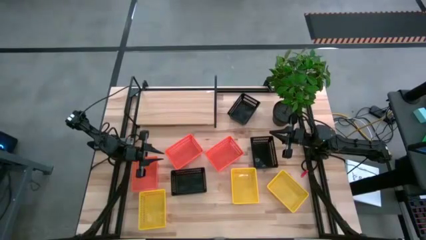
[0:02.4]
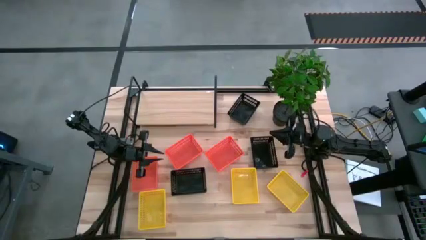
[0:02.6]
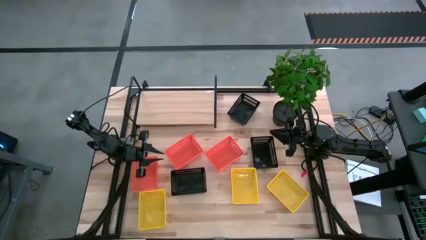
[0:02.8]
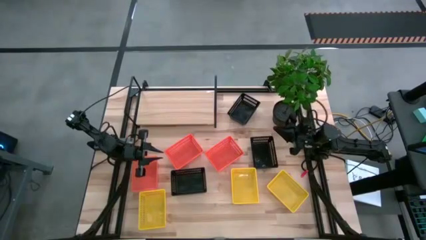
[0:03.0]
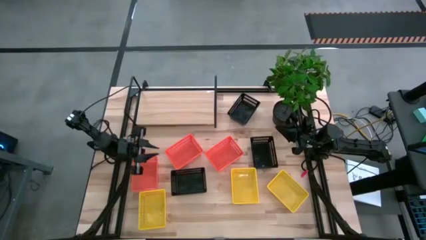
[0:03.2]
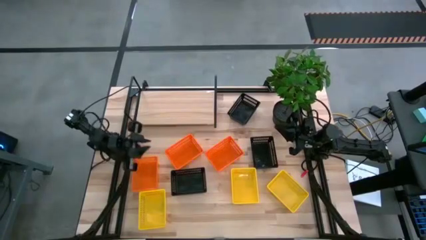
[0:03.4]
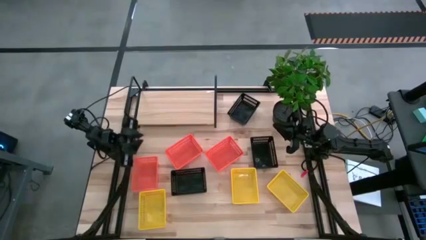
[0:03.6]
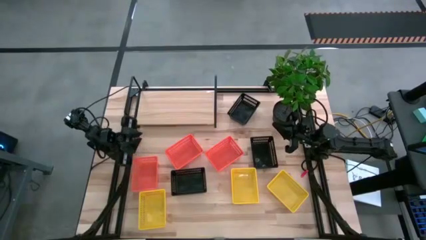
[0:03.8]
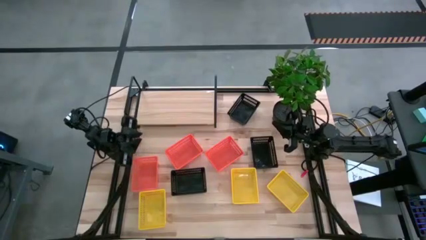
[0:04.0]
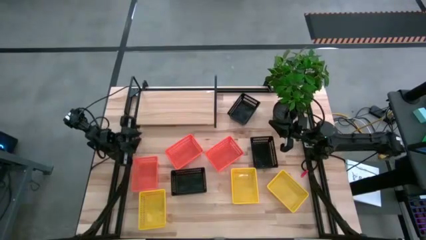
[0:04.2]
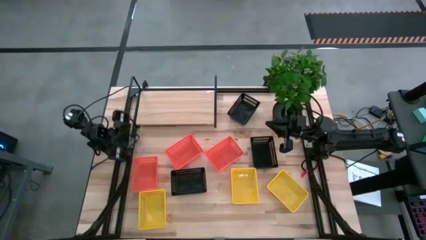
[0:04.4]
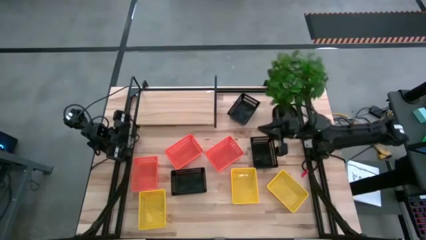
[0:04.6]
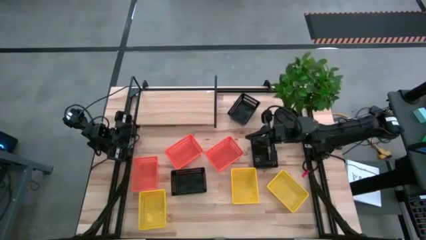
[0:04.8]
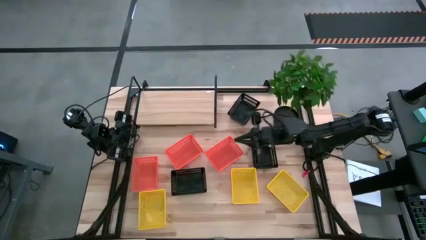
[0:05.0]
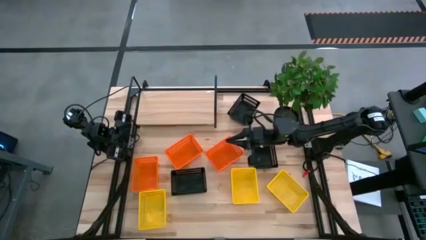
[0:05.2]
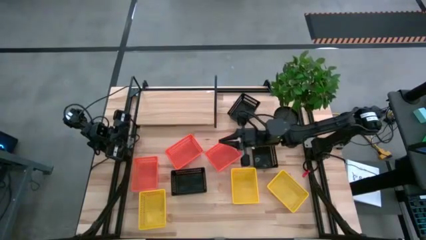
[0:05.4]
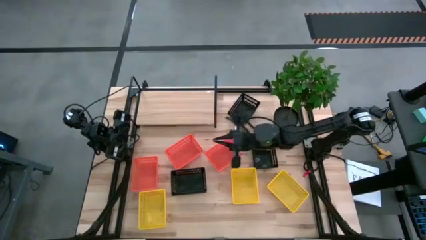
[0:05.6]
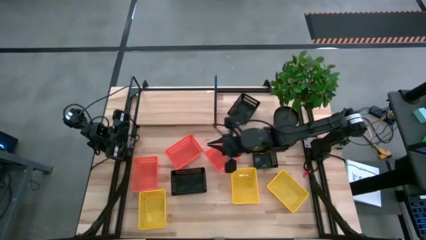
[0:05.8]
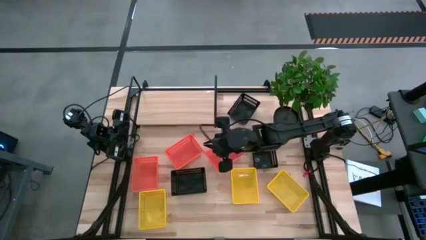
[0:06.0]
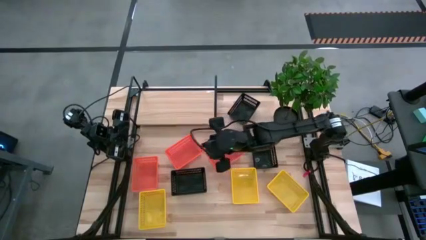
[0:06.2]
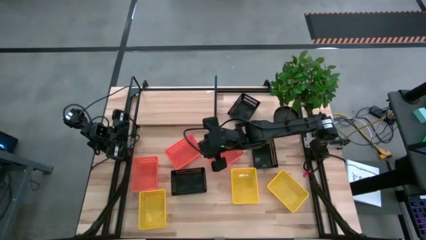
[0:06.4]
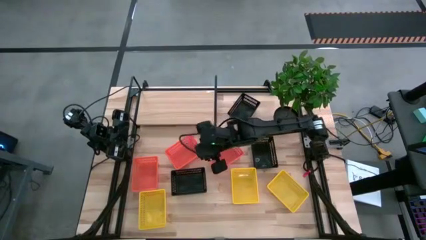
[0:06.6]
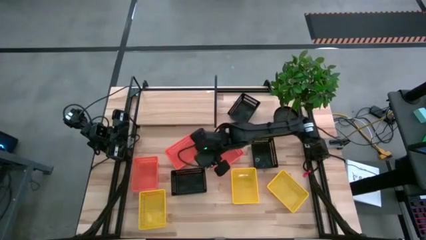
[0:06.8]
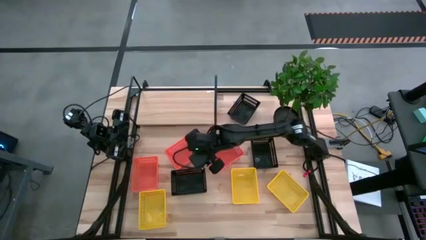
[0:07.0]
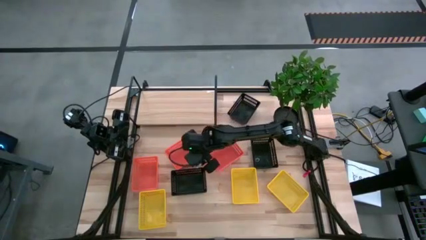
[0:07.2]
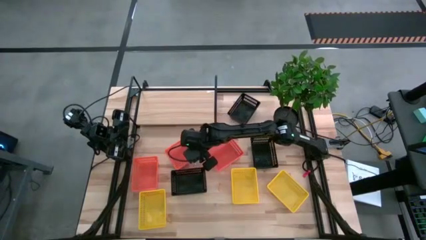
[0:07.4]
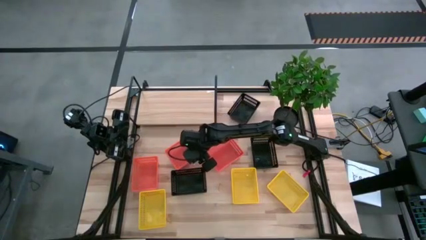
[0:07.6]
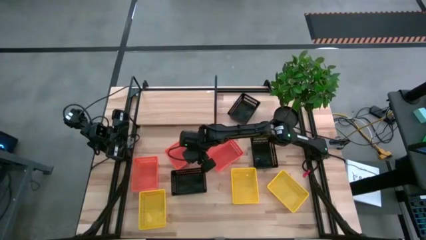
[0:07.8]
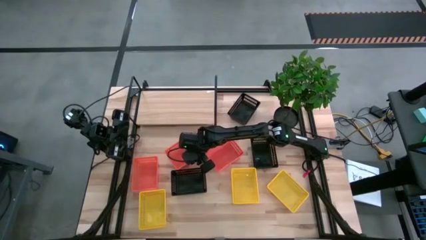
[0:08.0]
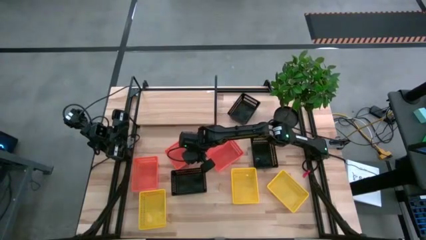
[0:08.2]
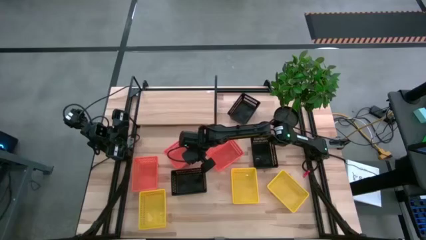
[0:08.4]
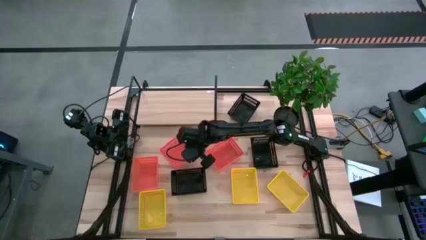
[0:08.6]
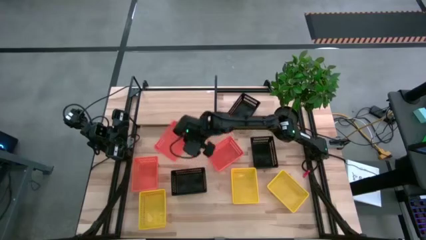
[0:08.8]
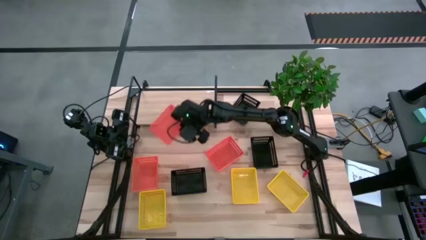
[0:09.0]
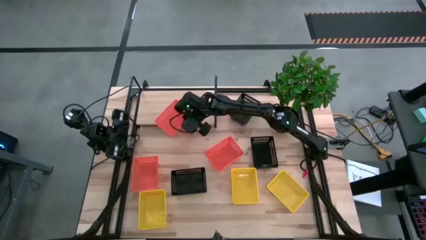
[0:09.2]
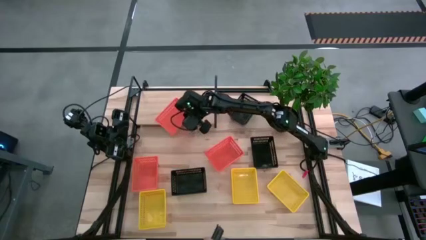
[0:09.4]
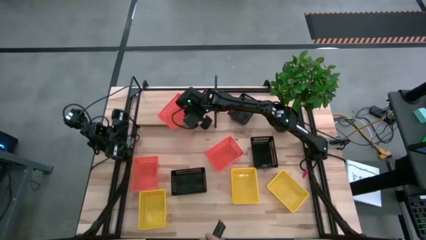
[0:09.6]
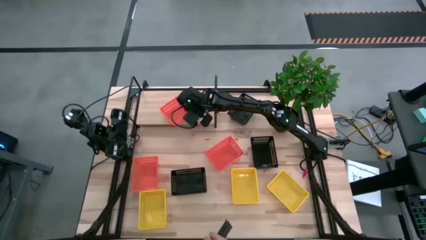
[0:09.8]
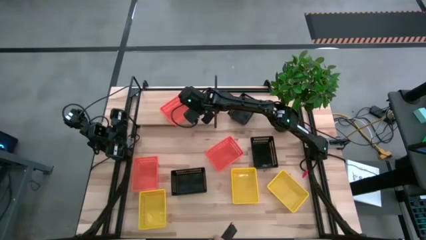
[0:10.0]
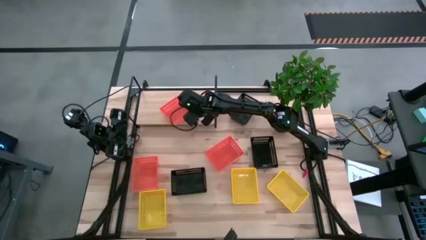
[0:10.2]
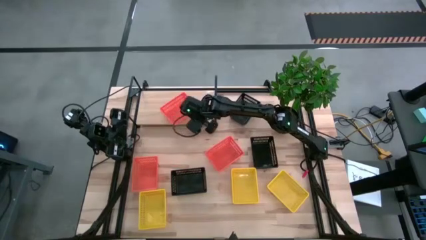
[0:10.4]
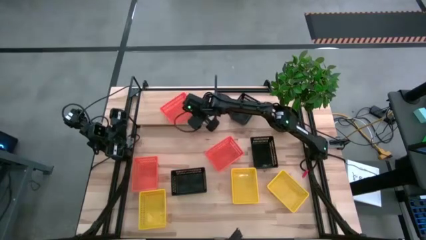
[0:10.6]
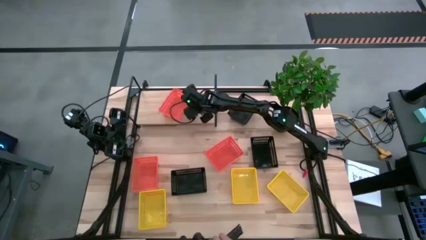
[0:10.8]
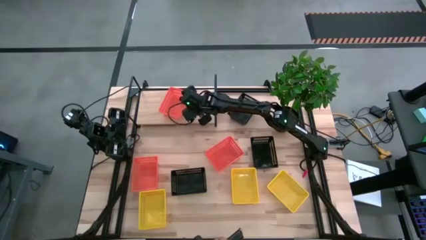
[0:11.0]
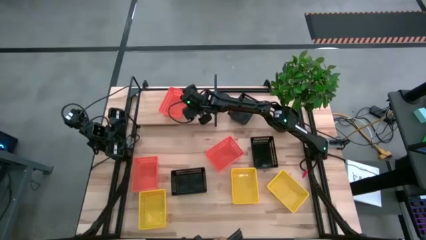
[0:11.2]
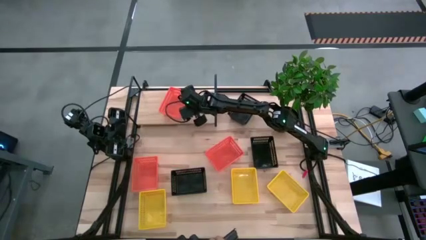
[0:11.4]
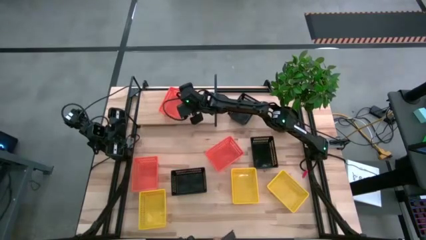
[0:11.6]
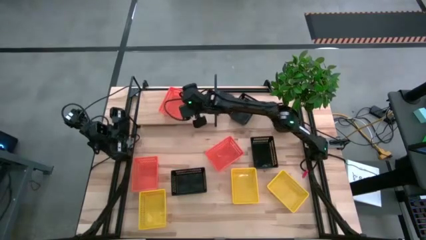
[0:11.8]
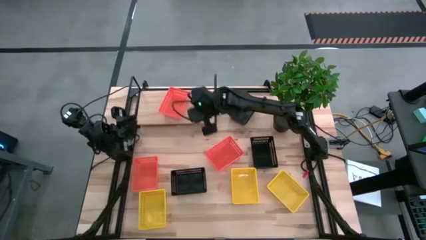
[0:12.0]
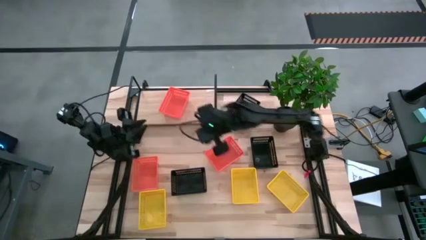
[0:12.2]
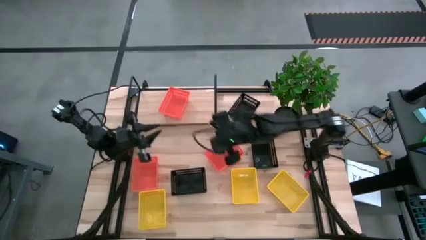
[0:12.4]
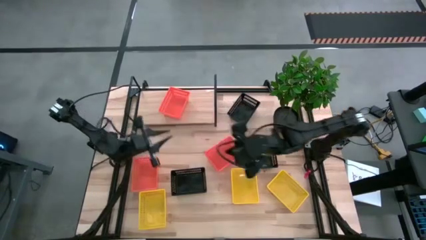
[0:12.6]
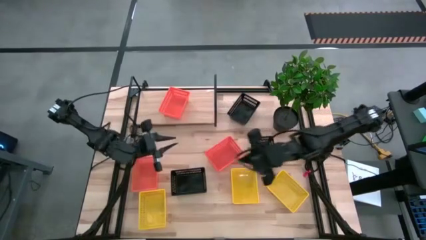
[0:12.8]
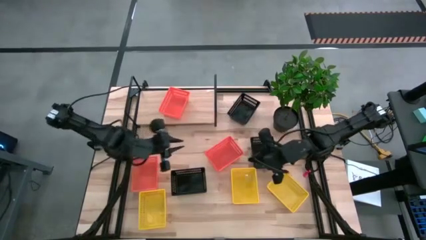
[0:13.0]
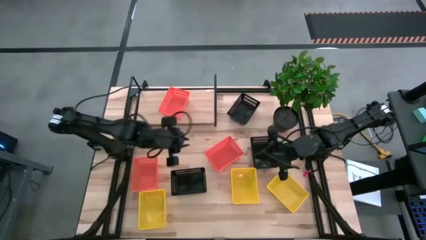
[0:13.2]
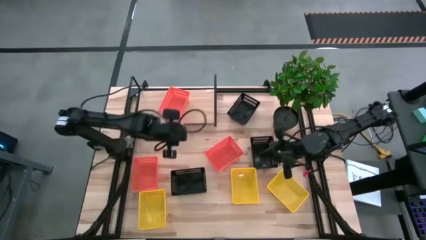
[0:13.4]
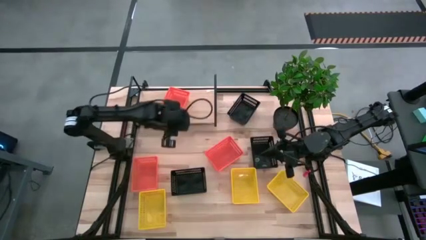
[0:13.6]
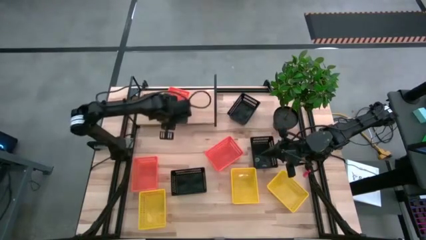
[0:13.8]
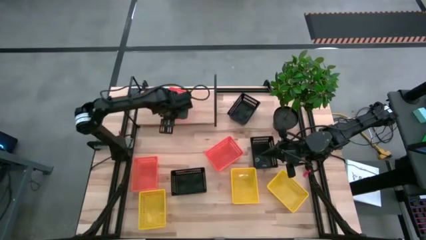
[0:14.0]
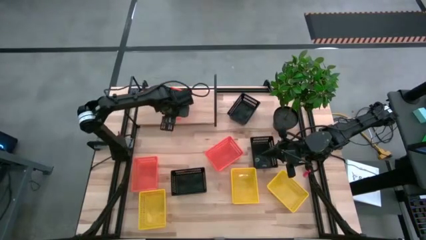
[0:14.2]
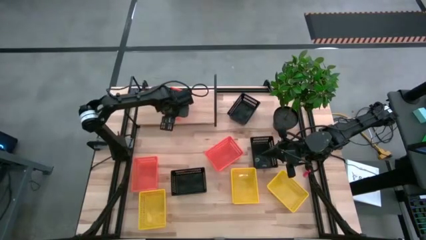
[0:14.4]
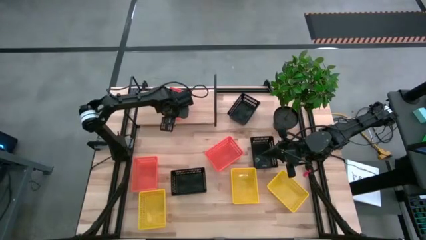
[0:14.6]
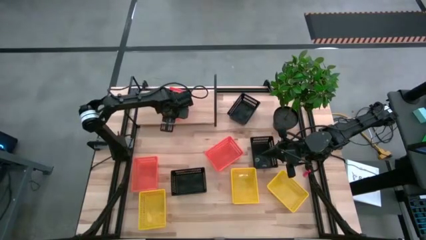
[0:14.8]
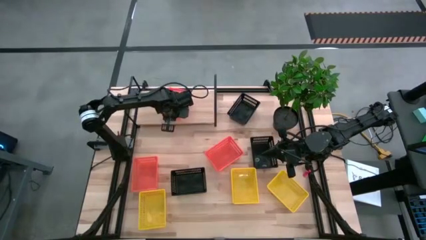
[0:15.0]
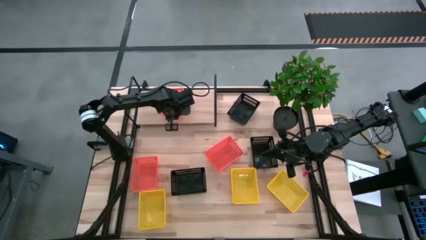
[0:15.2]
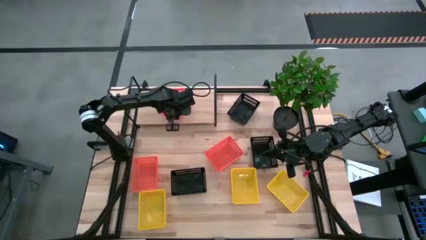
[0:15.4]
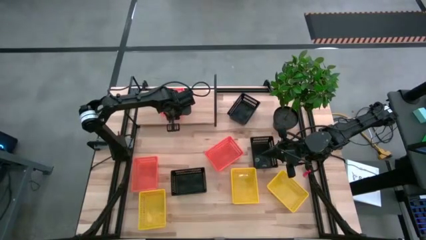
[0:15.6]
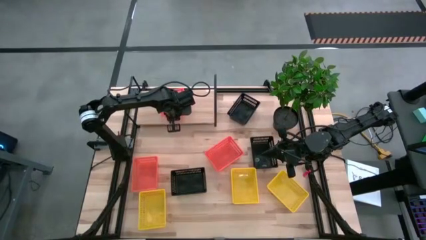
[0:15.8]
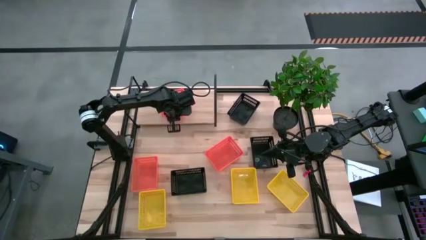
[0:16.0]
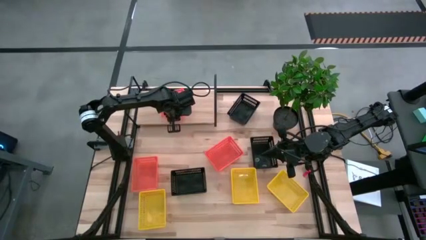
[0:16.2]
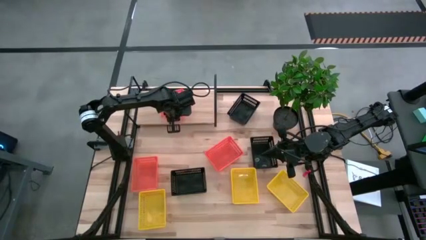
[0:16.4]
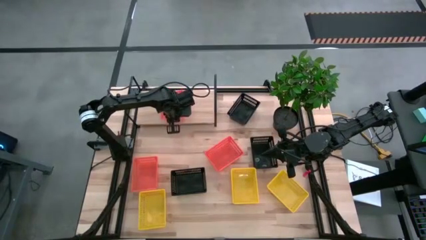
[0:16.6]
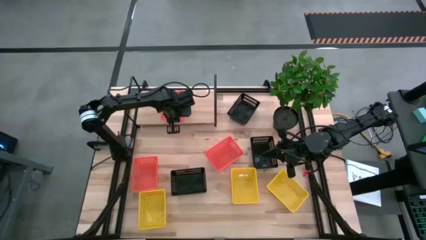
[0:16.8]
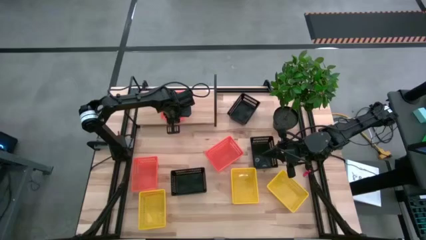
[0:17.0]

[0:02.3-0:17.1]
Task: Stack baskets on shelf by color
Put the middle orange bin on the shelf
